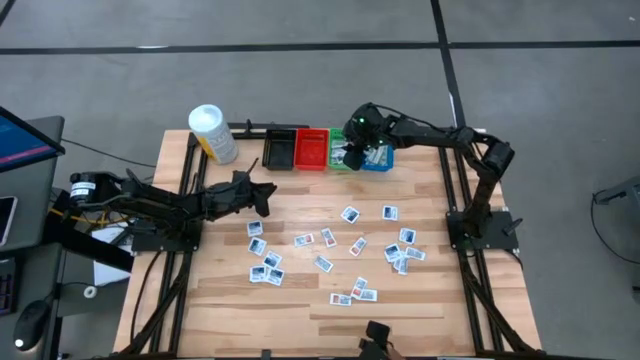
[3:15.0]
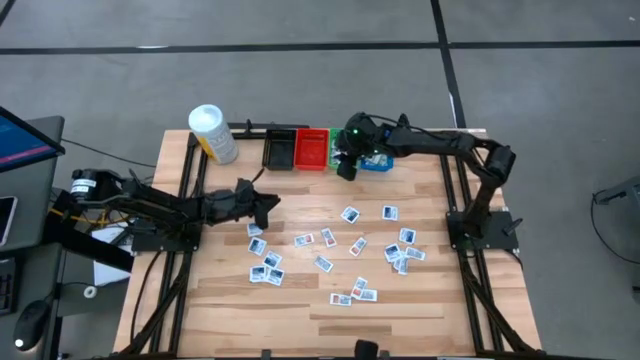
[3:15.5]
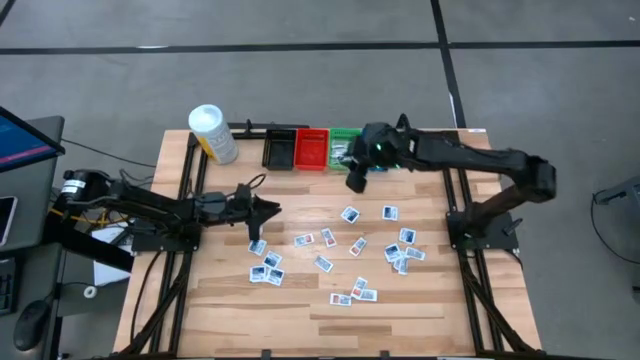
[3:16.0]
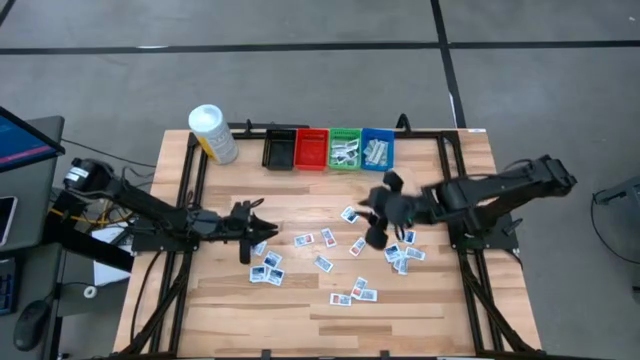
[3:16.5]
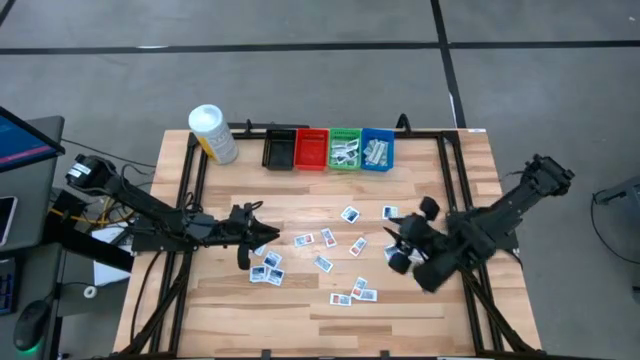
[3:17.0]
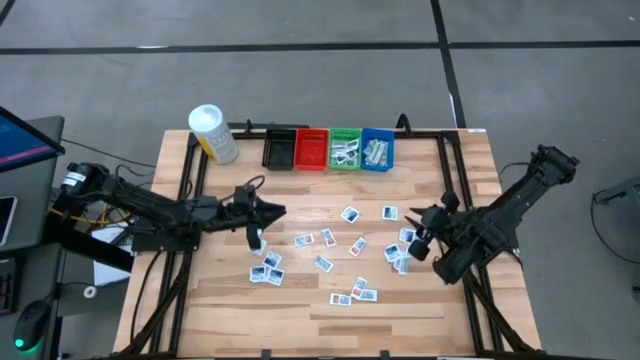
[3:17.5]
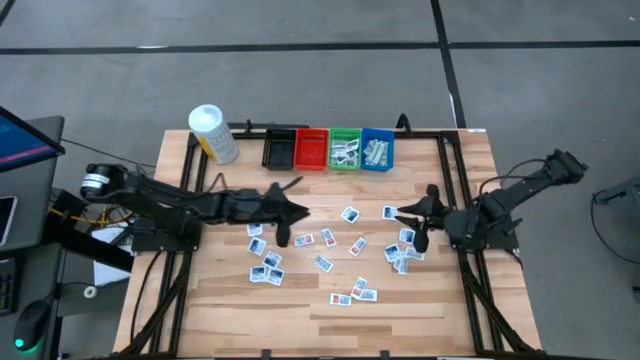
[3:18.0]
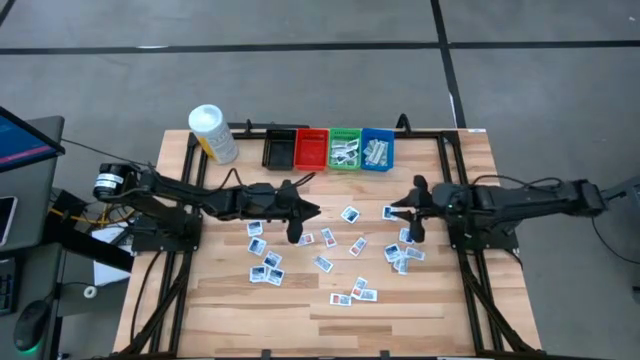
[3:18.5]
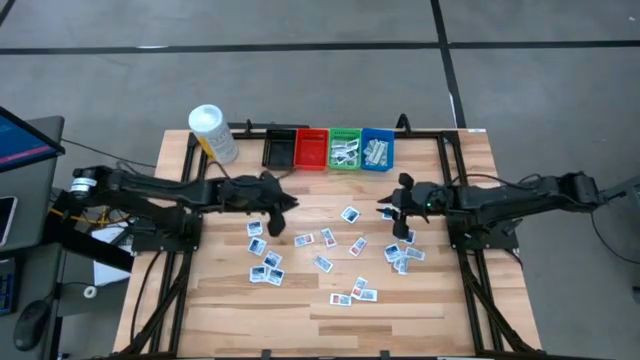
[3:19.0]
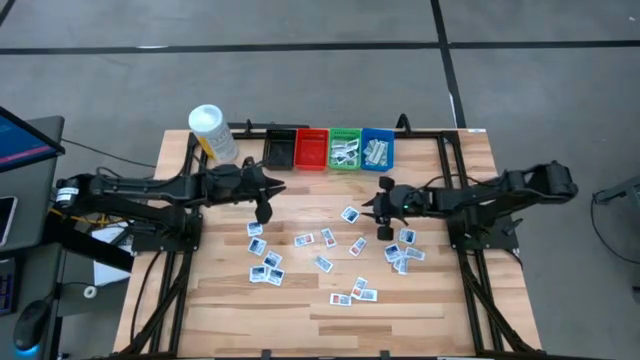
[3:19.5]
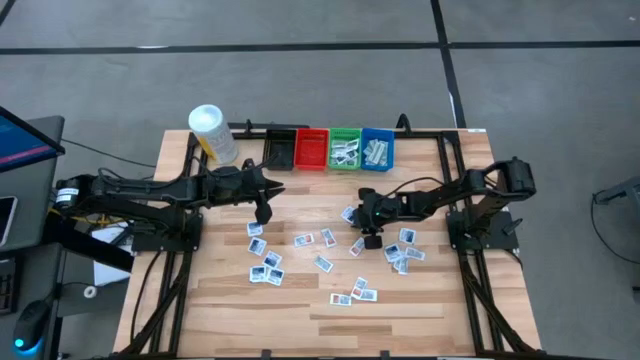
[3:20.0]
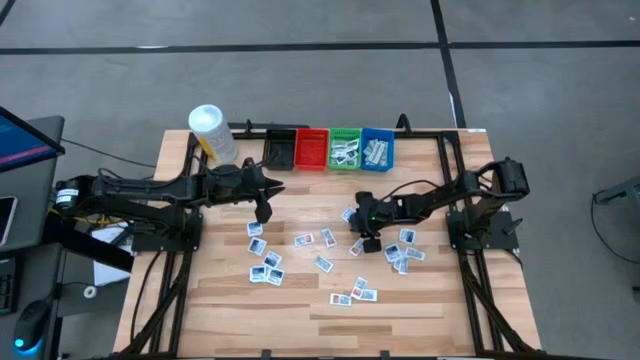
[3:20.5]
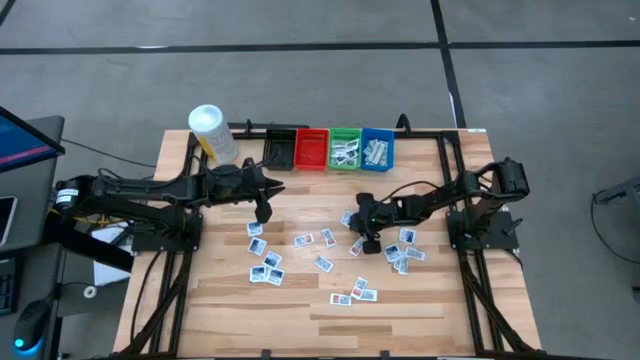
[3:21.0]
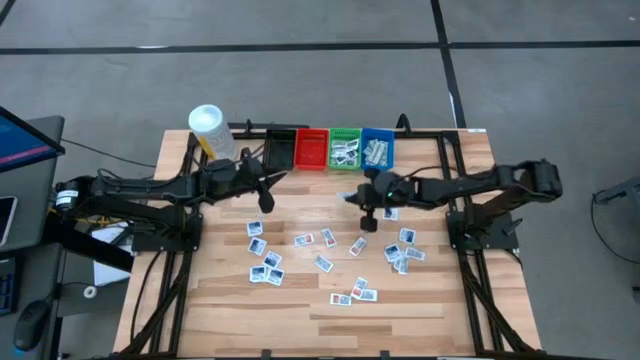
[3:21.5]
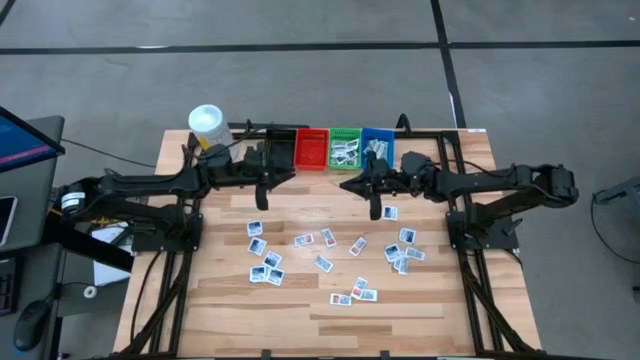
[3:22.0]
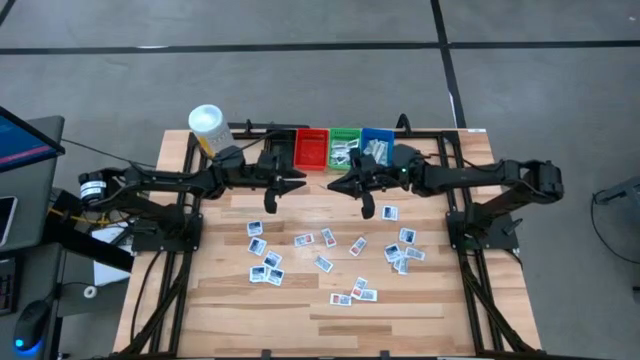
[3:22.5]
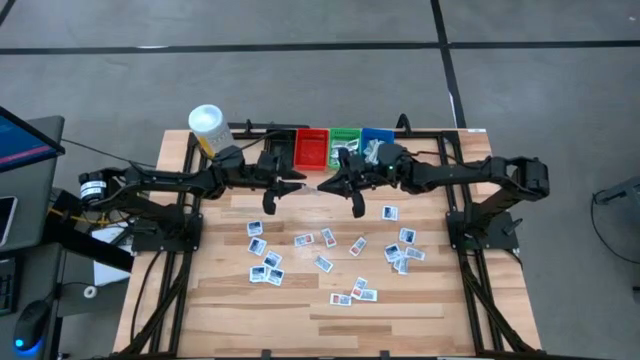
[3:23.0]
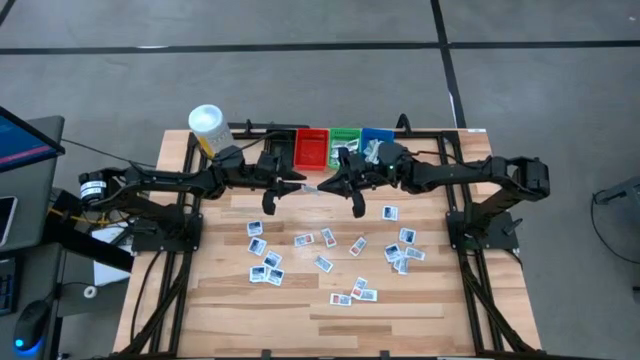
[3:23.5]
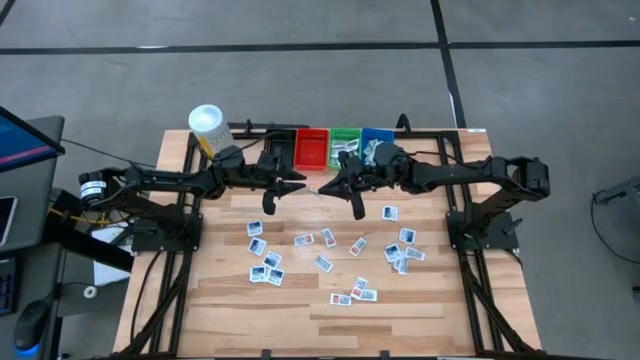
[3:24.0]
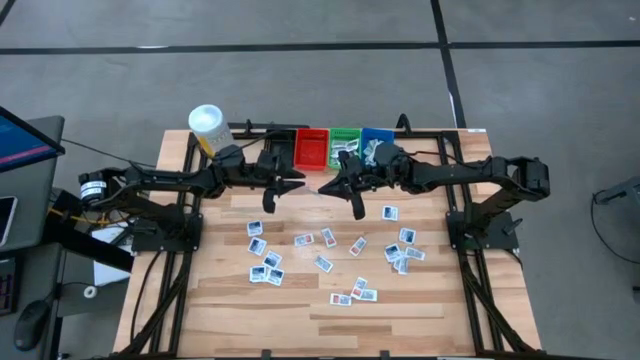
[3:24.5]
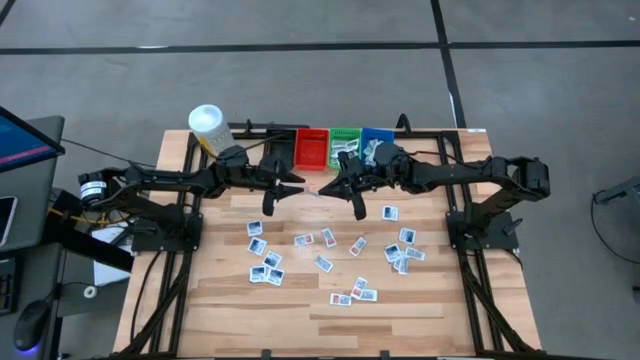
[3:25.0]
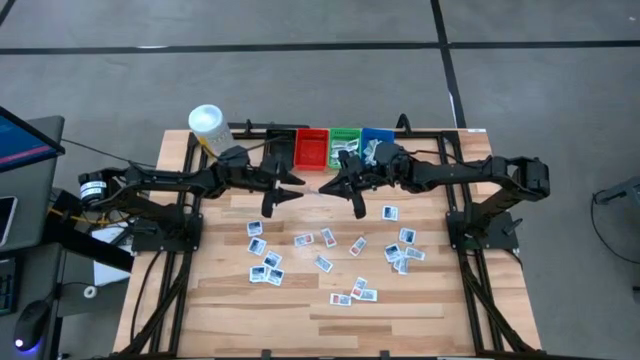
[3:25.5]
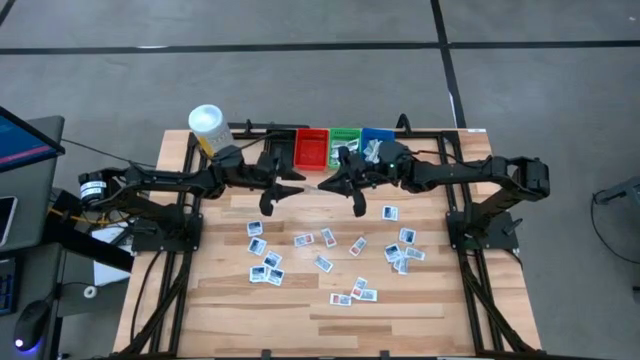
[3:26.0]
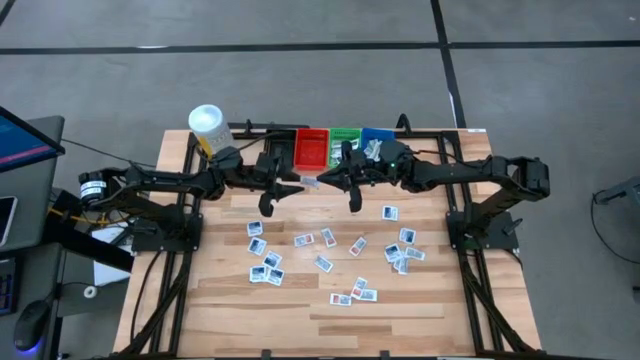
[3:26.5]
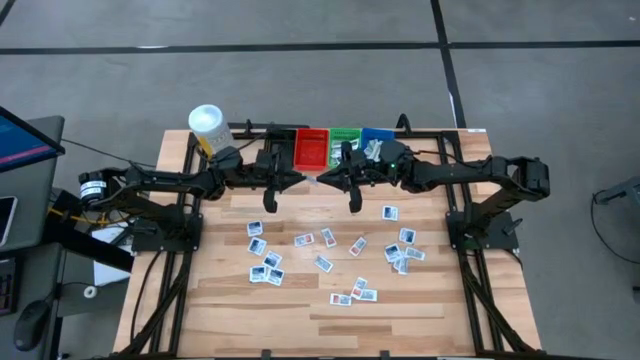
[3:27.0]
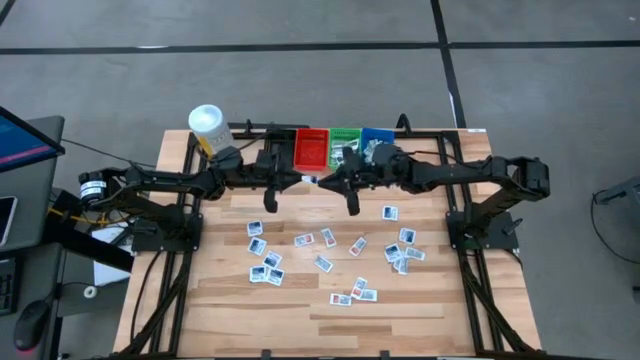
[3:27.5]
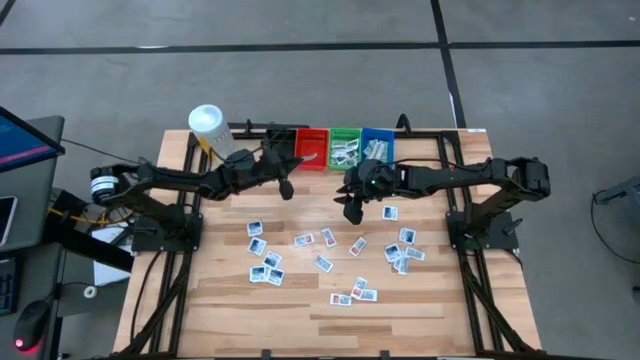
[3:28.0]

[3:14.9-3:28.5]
Task: Pick & Place First Aid Supplies
Put the alcohol pad into the red bin

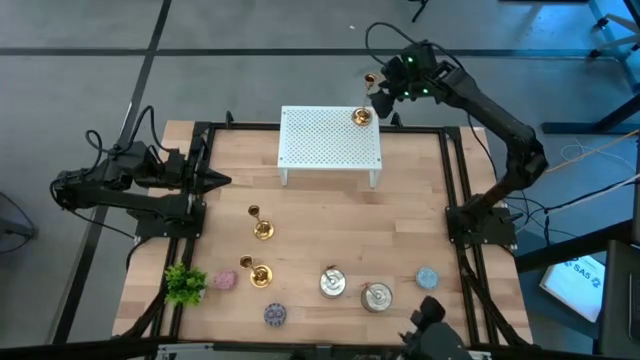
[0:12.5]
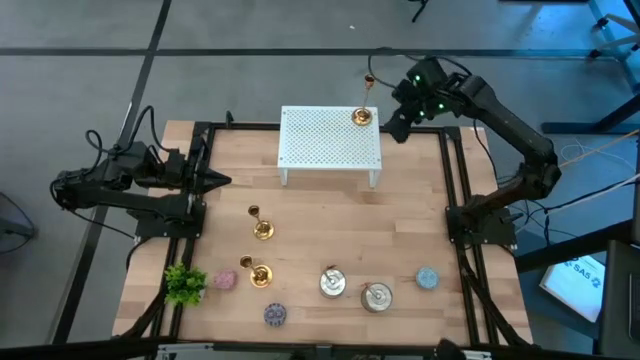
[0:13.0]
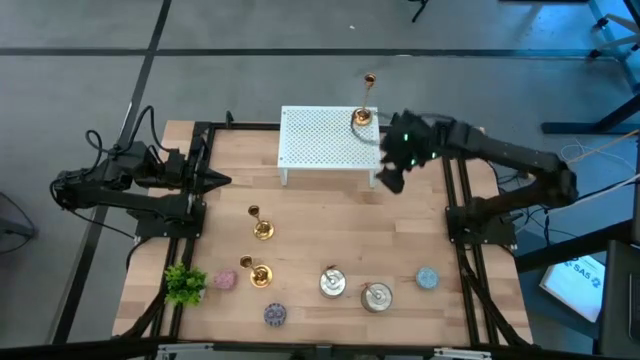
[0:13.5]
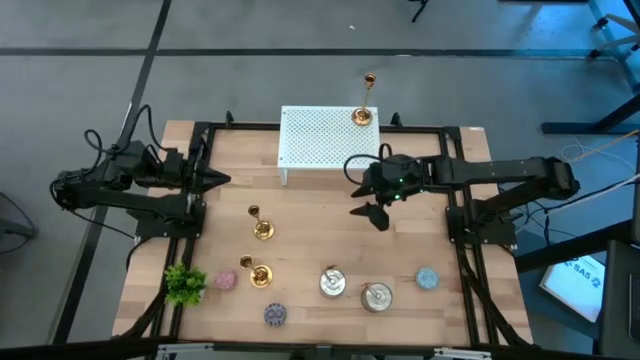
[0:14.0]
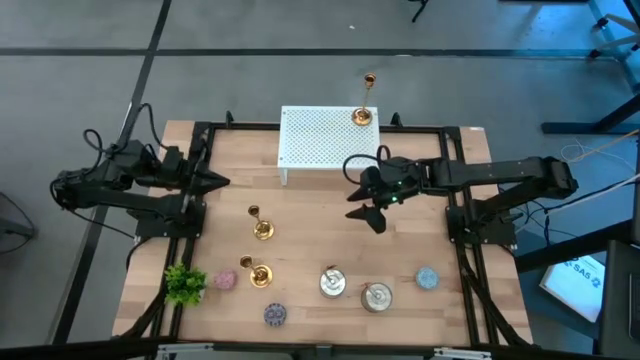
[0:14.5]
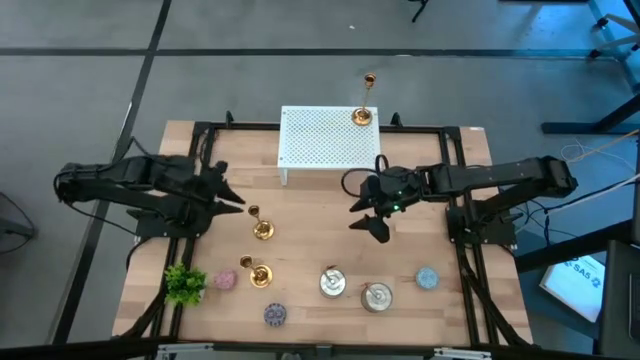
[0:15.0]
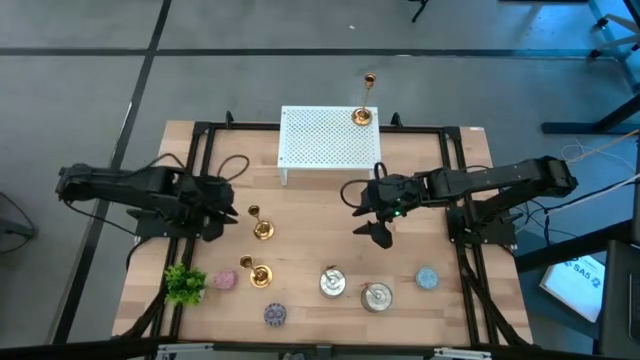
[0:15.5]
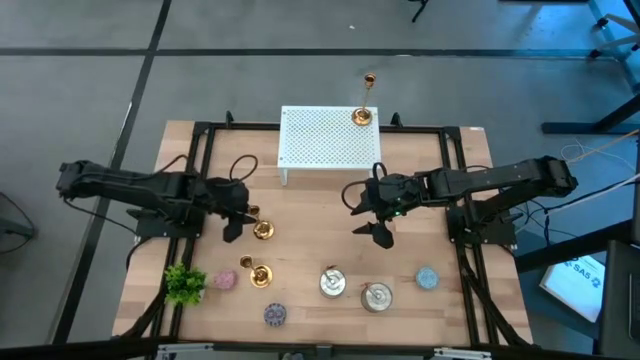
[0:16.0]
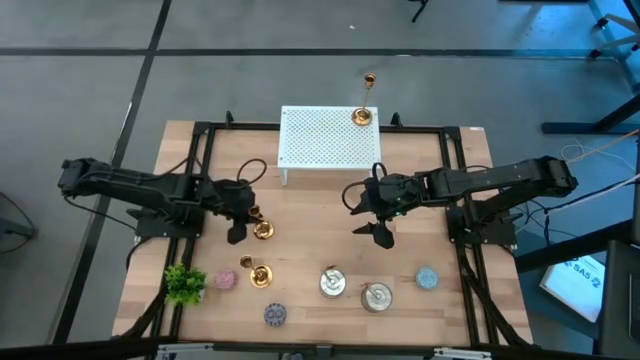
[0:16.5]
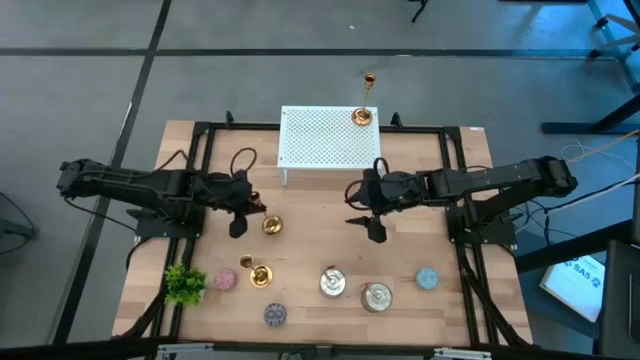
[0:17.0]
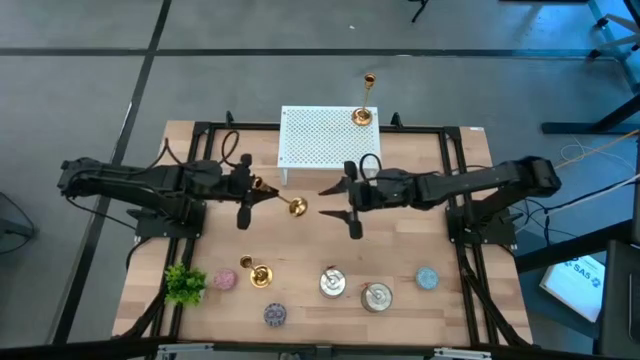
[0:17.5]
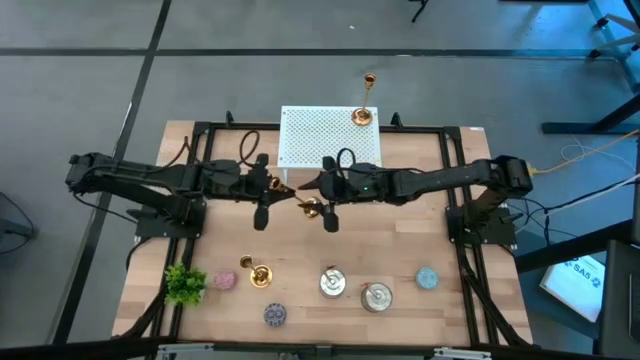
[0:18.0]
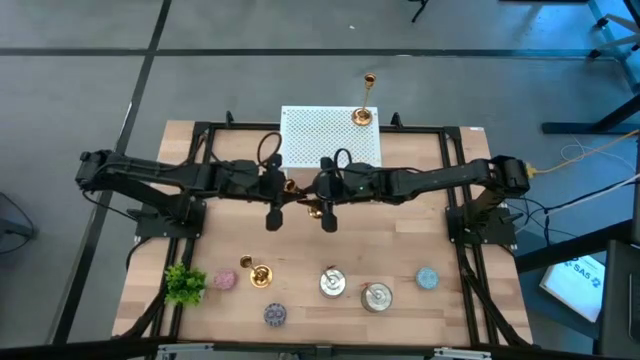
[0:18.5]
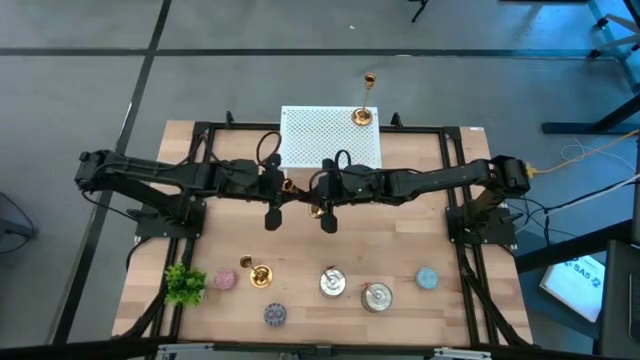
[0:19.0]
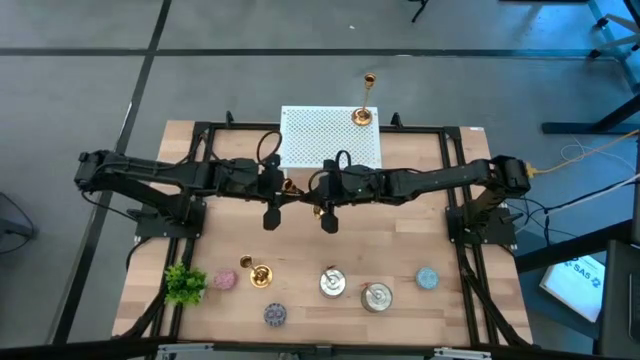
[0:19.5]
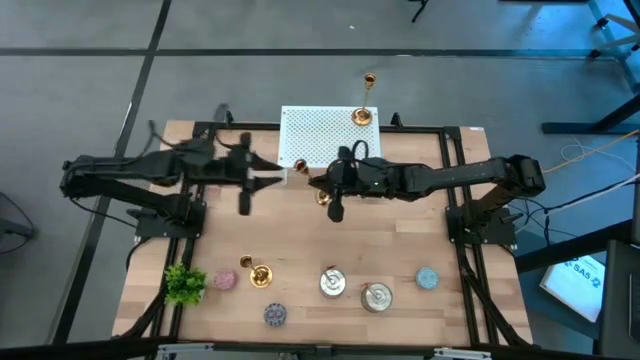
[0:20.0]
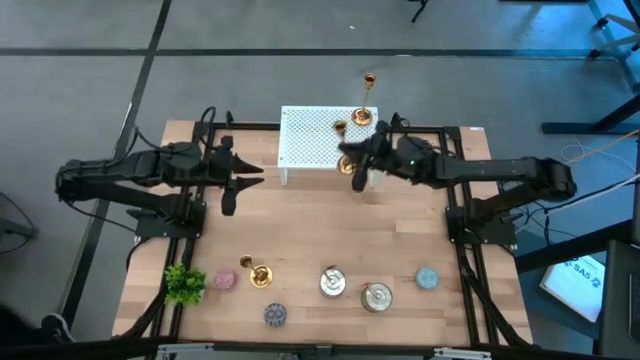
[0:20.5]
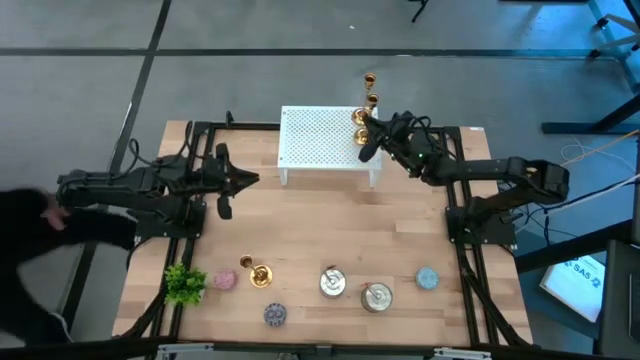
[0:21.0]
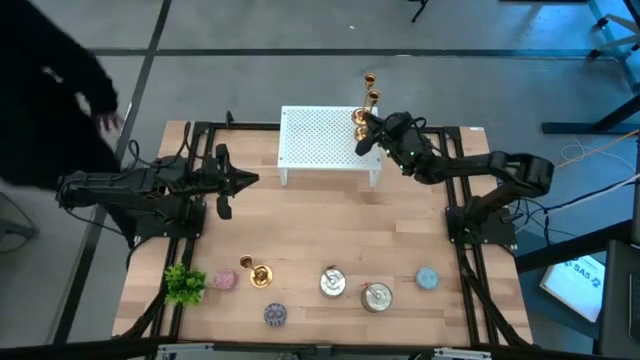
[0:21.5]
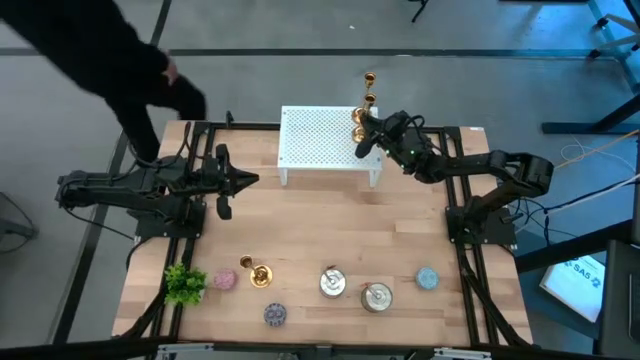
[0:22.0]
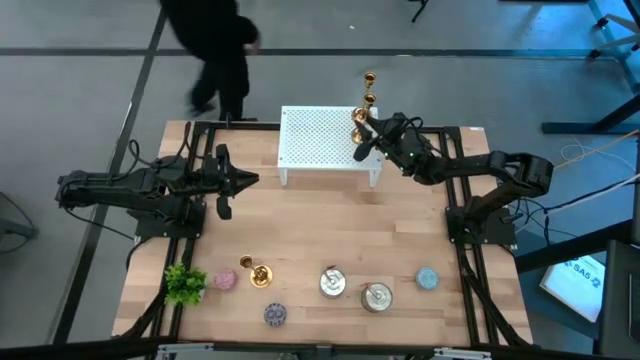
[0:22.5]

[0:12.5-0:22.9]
Task: Pick & Place candle stick holders
Put the top gold candle holder on the shelf and align it with the other gold candle holder
